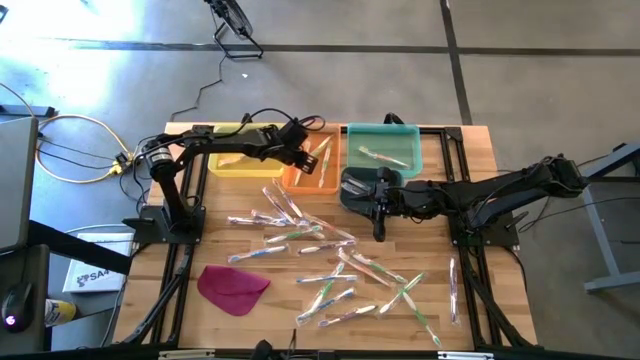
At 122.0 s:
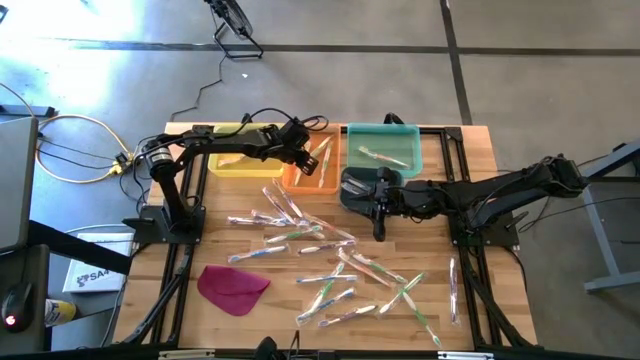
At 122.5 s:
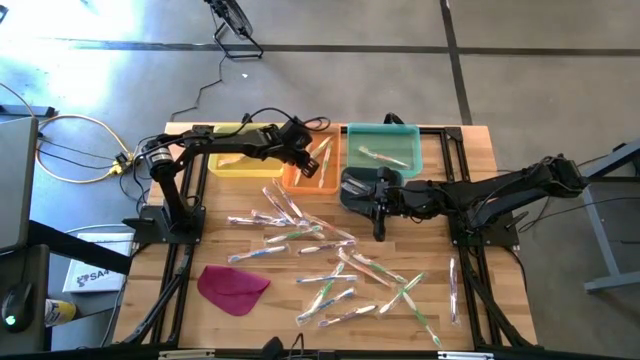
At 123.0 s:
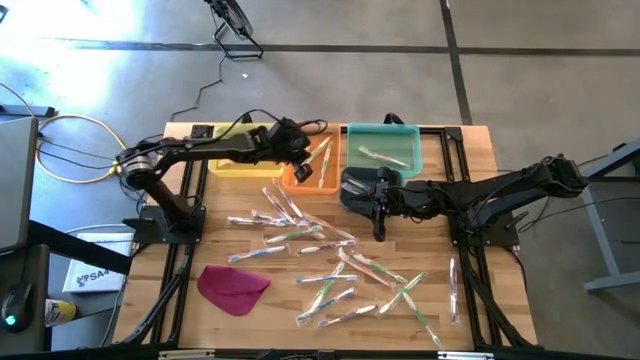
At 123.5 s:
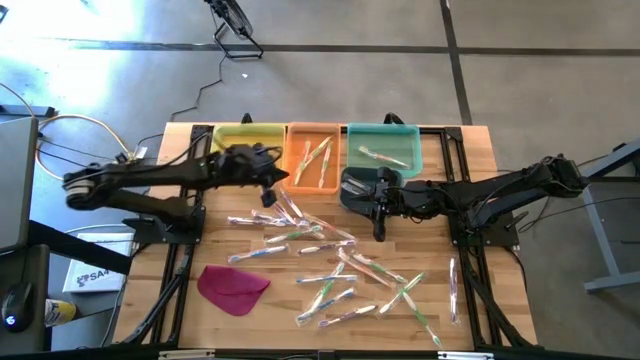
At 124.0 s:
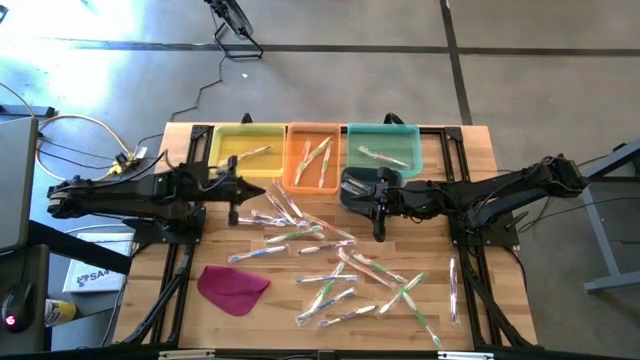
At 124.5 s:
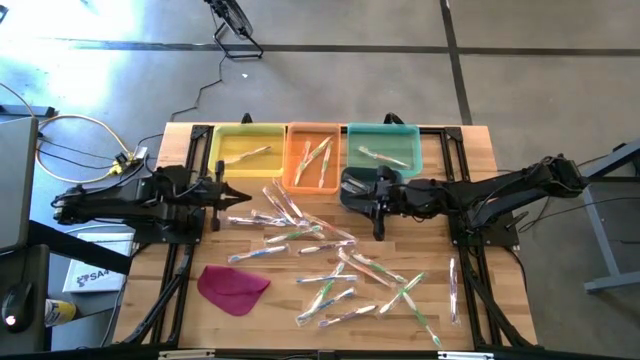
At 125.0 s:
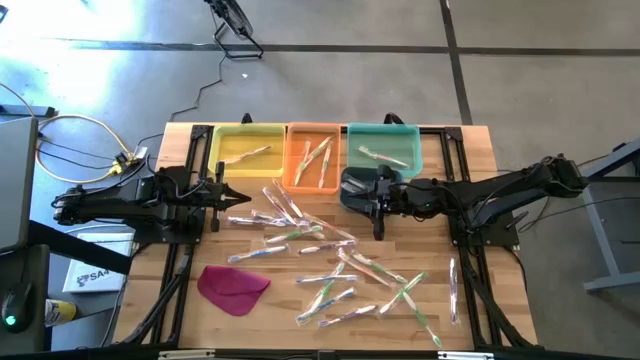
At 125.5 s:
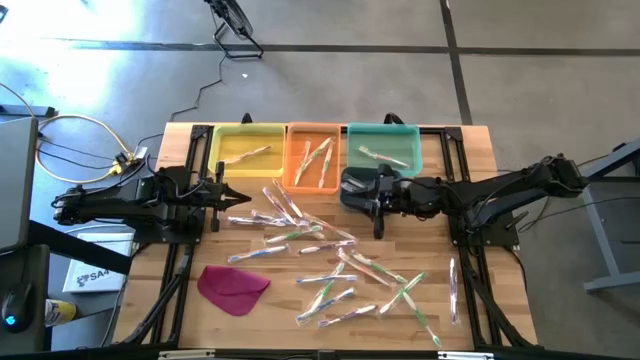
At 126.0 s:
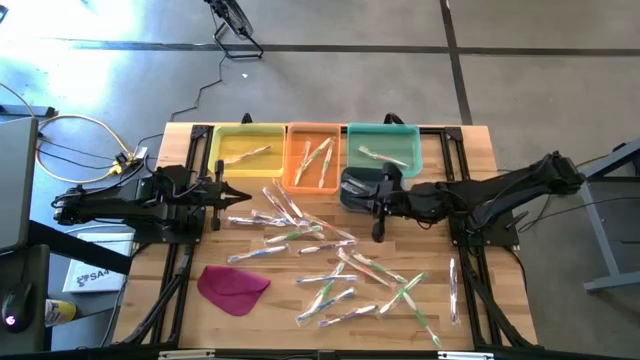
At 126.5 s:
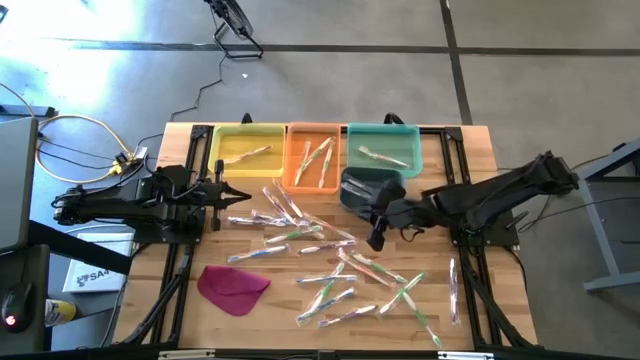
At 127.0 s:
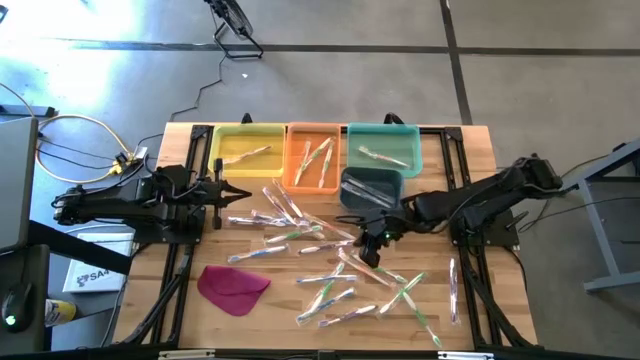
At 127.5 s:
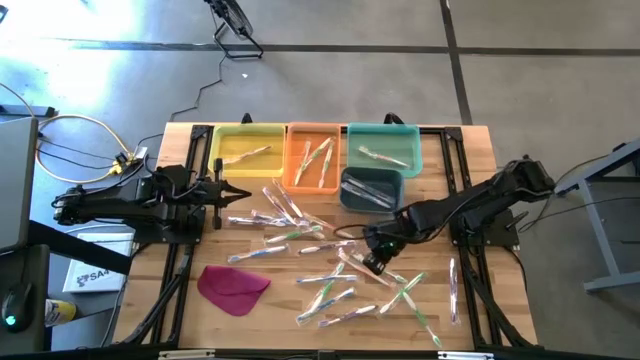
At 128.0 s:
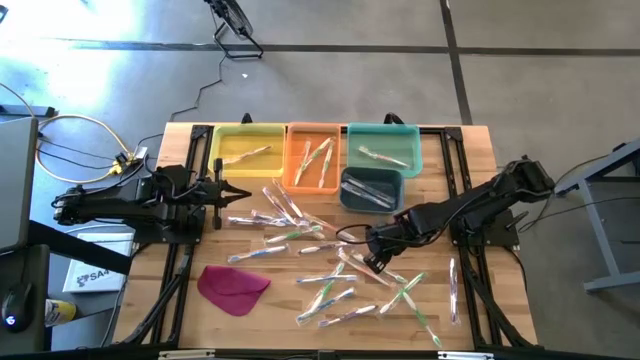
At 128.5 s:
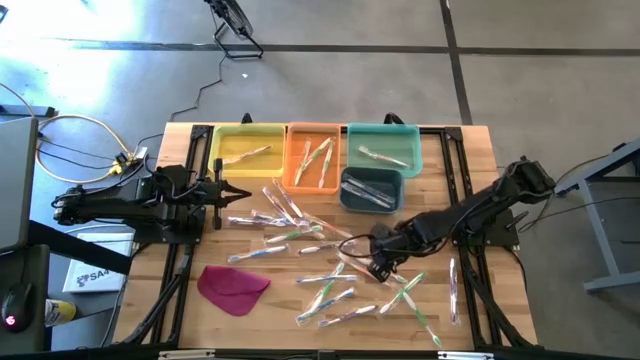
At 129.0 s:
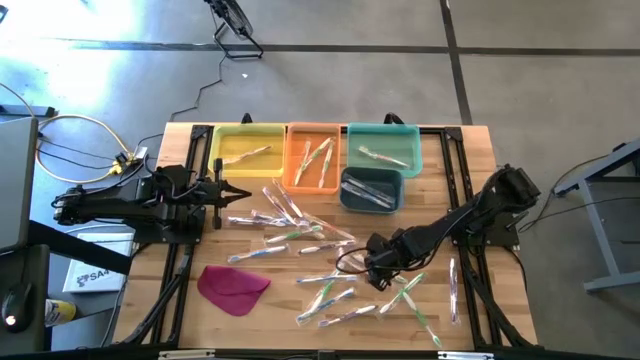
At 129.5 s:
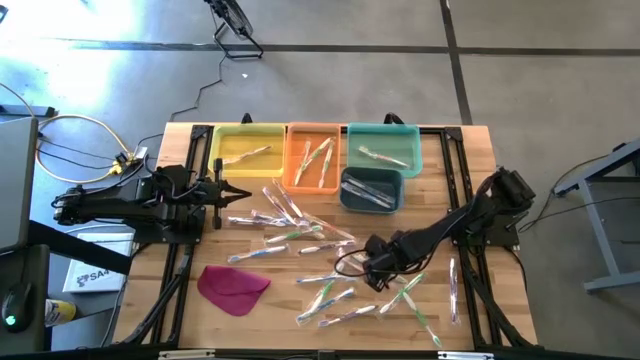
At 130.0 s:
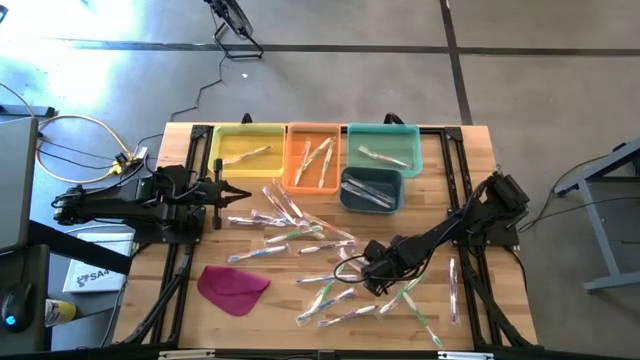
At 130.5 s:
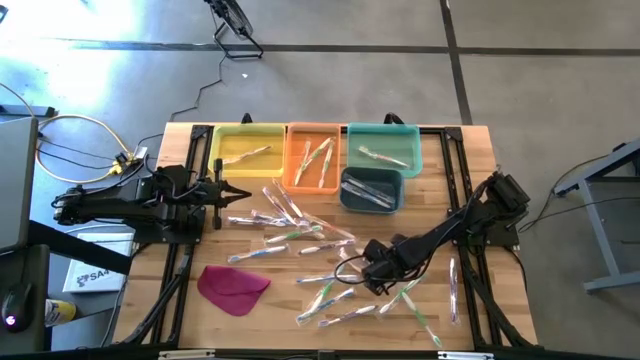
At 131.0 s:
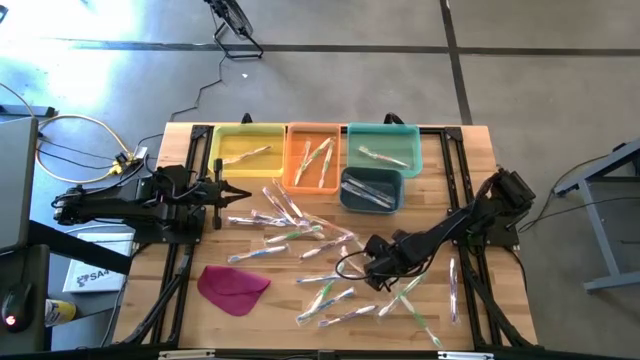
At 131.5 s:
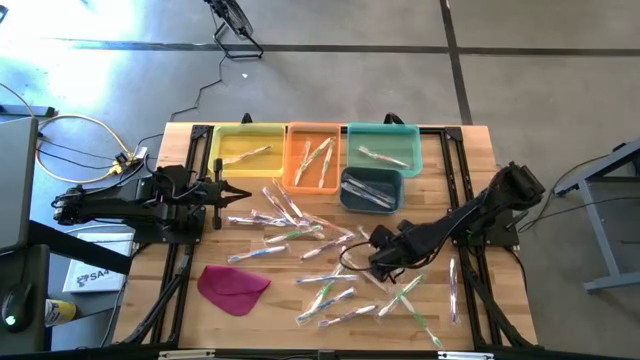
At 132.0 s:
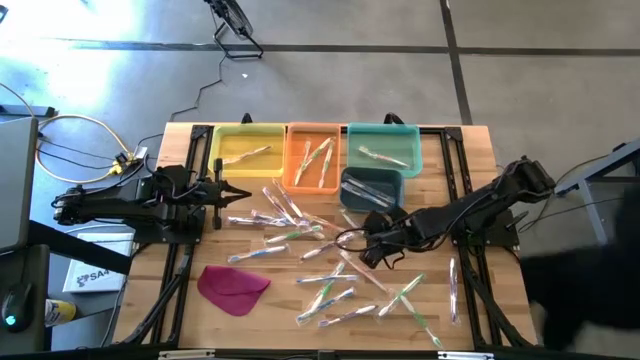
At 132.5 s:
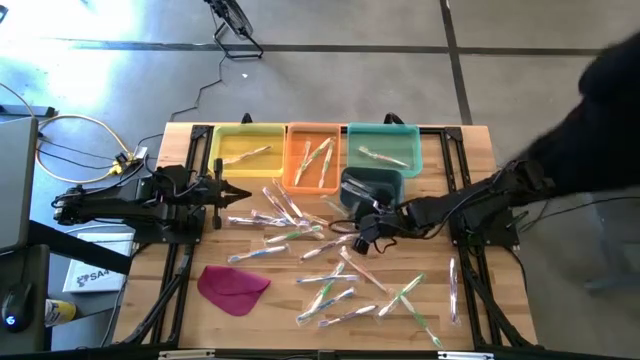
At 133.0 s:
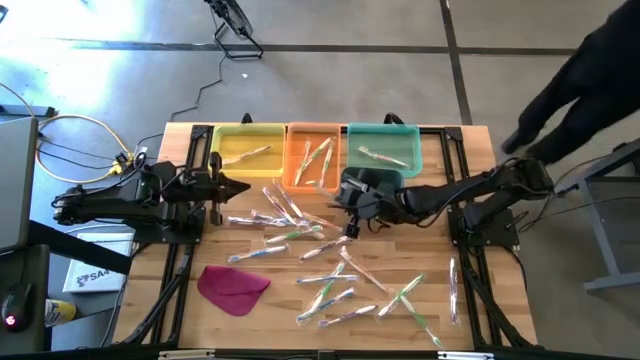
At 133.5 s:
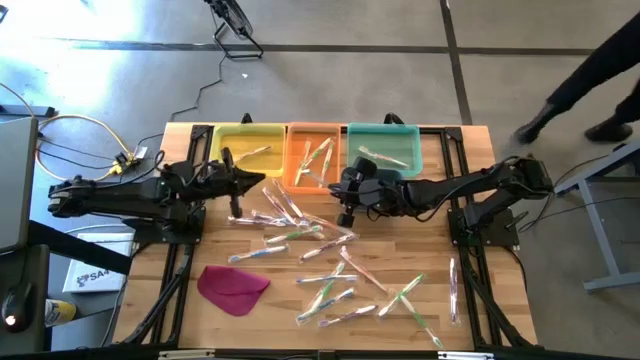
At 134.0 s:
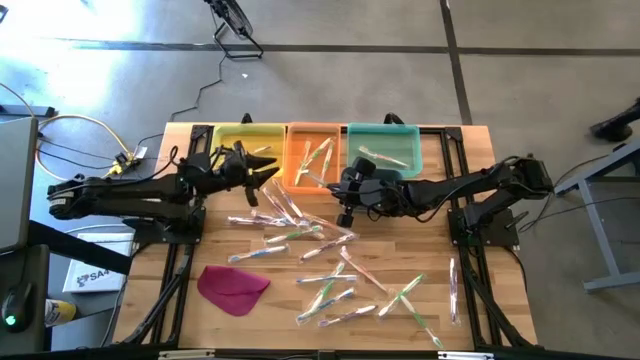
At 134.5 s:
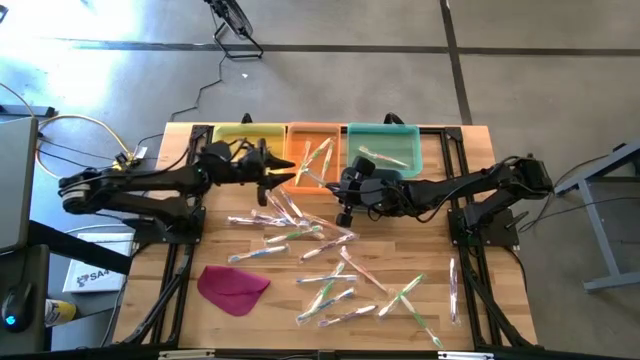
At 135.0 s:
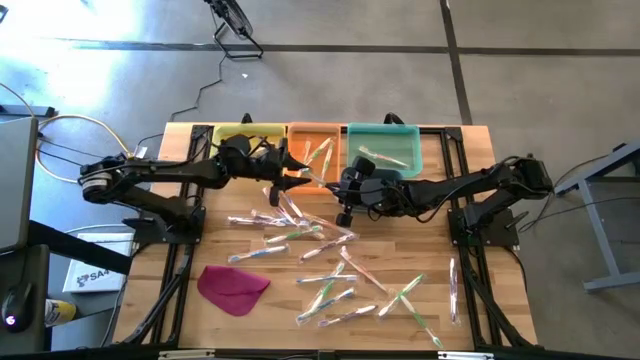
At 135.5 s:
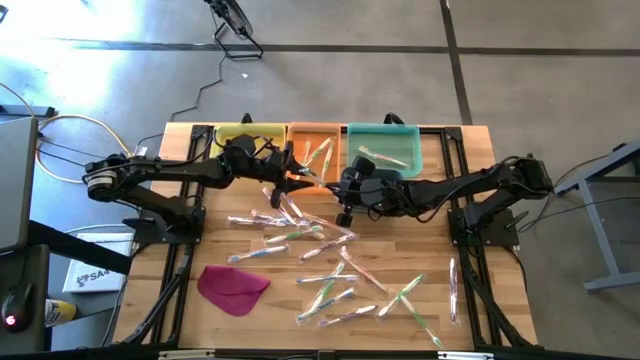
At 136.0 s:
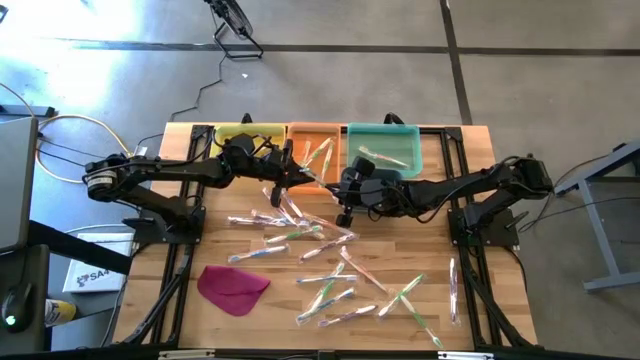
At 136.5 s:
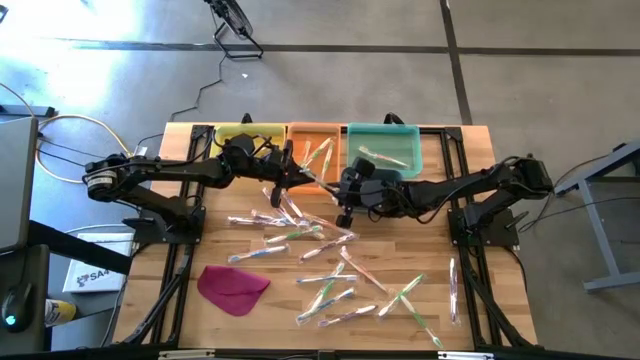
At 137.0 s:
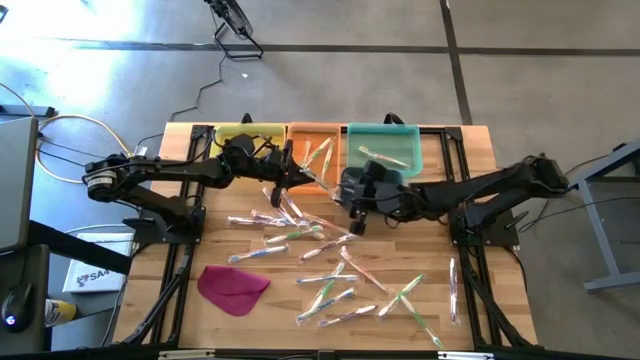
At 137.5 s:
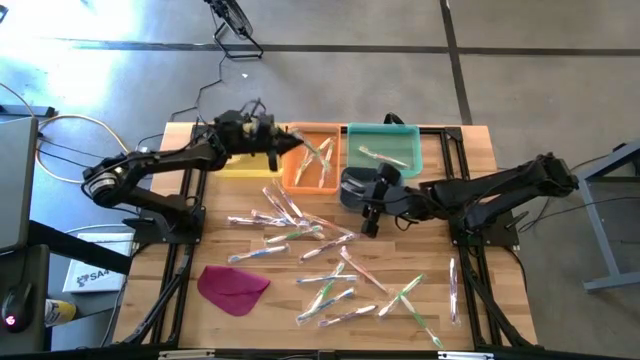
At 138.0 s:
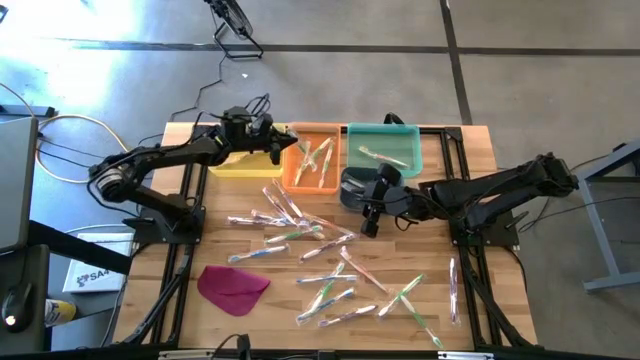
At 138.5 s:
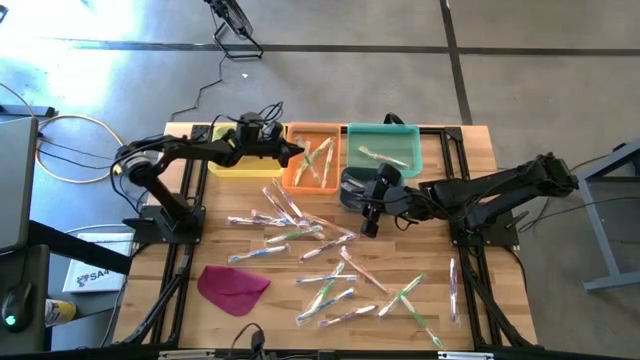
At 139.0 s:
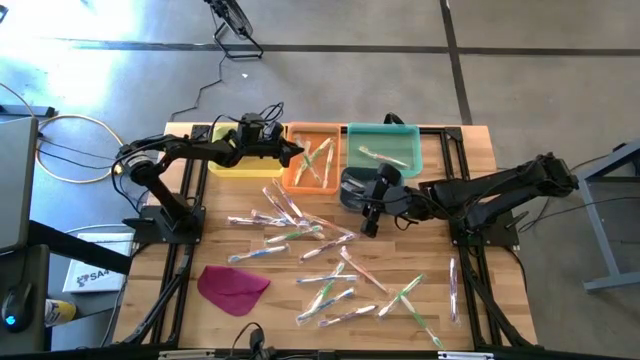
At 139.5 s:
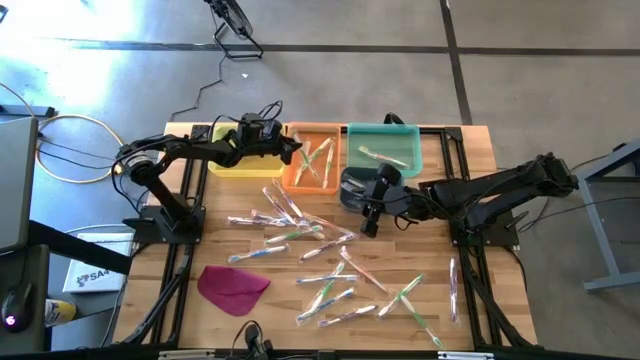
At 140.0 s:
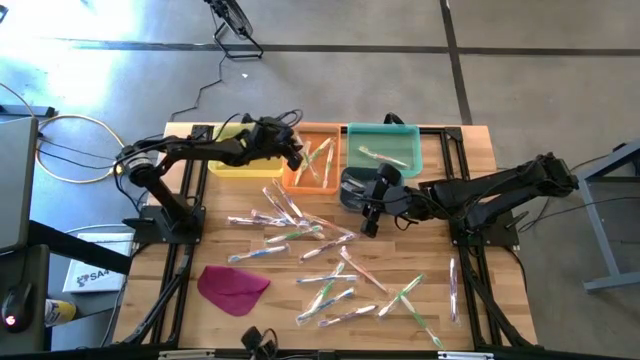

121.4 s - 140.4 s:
Task: Pick & Place Toothbrushes
Put the green toothbrush into the orange bin

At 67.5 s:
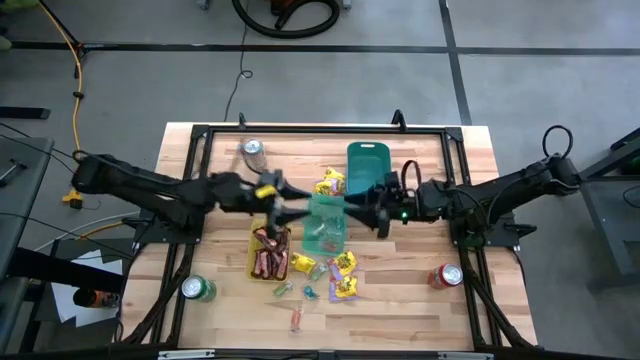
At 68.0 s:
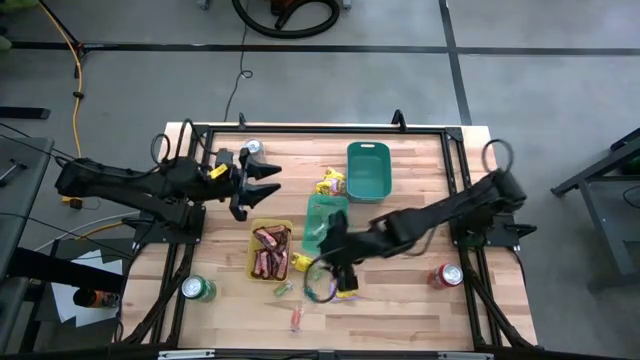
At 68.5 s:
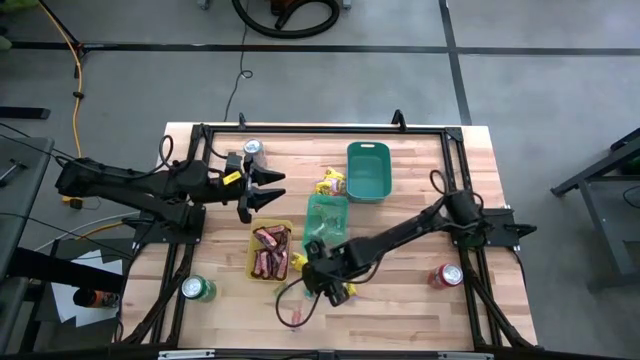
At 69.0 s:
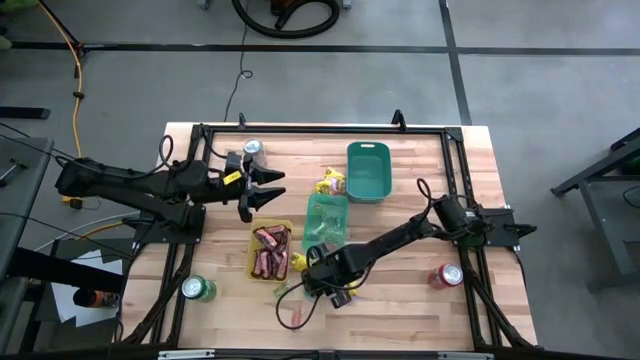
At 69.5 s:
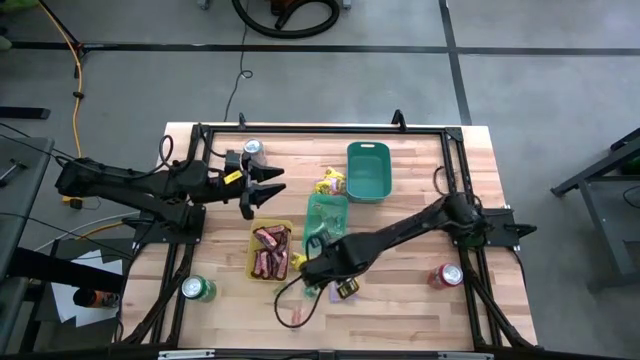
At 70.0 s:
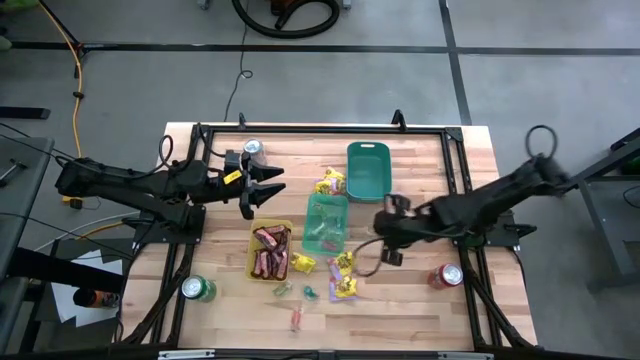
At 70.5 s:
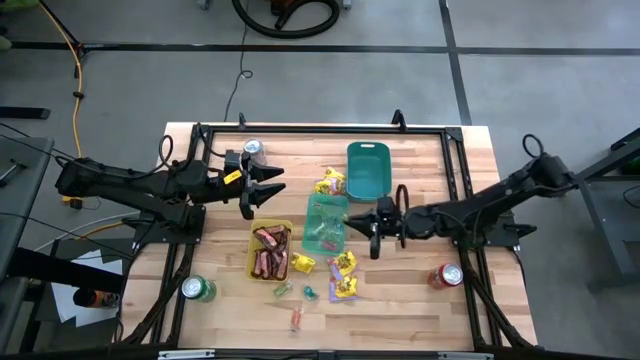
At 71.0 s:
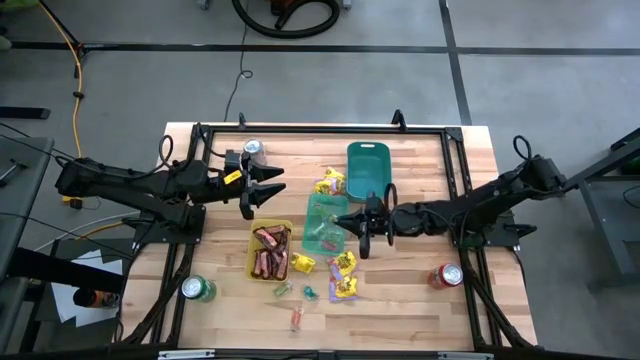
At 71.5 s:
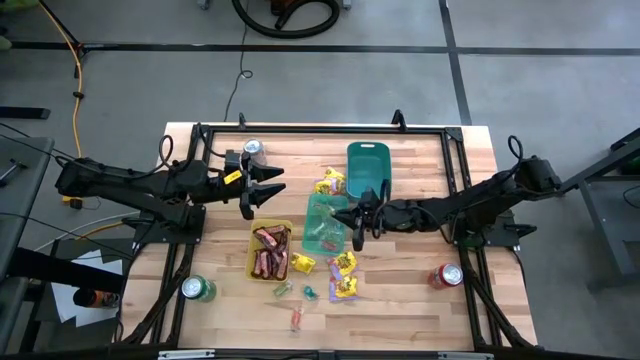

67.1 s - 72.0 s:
Task: Sort candy
Put the green gummy into the light blue bin
